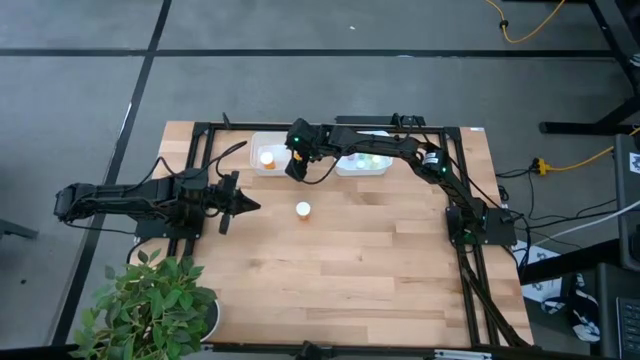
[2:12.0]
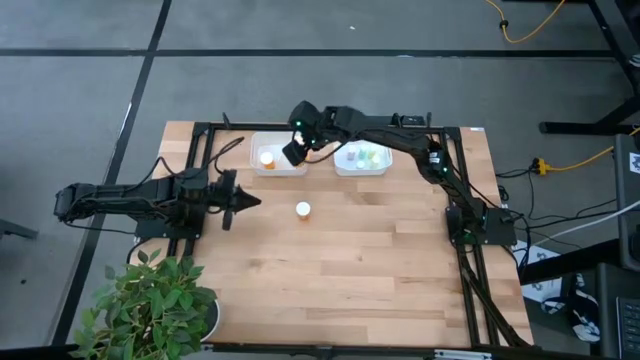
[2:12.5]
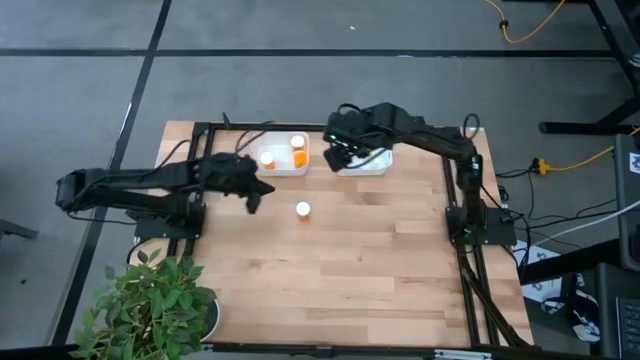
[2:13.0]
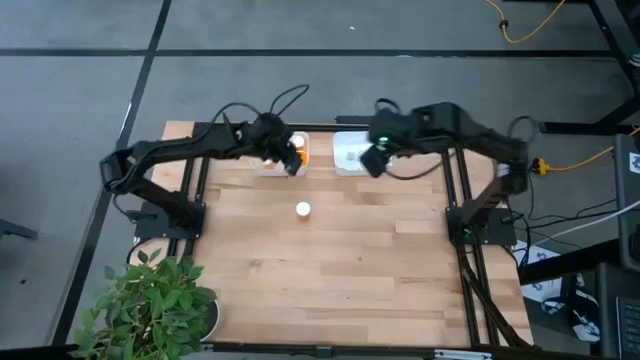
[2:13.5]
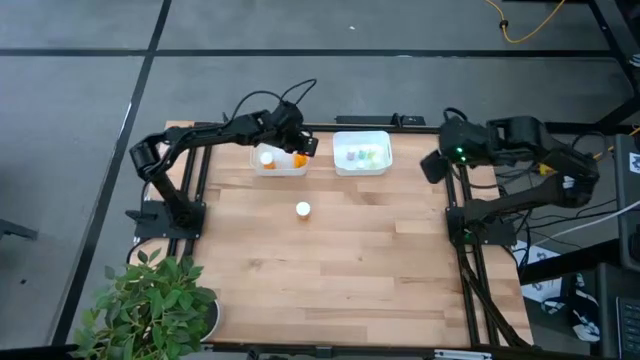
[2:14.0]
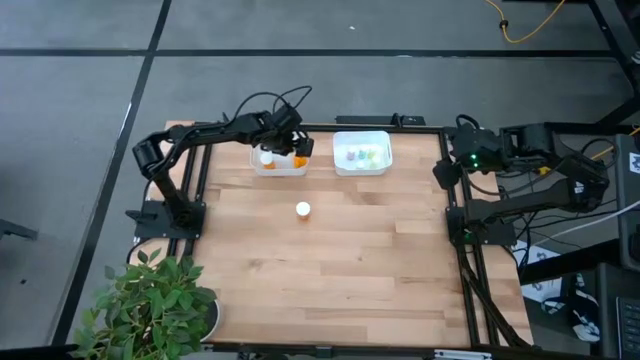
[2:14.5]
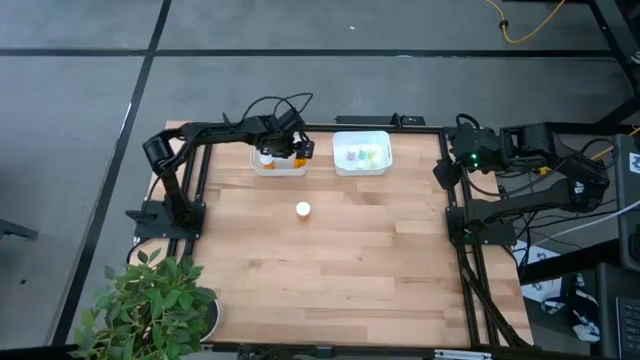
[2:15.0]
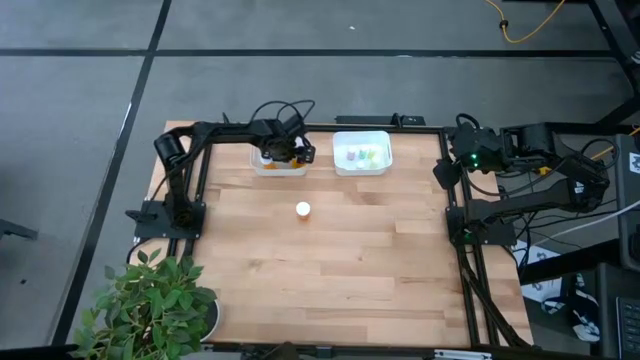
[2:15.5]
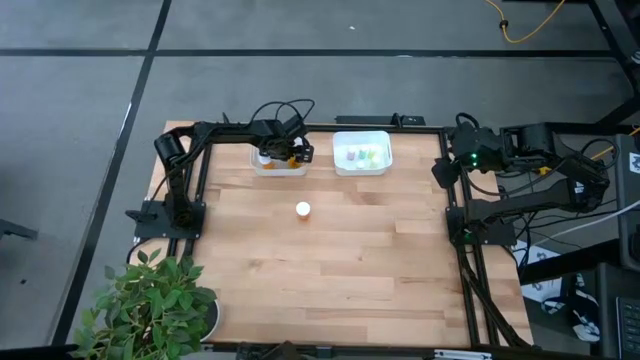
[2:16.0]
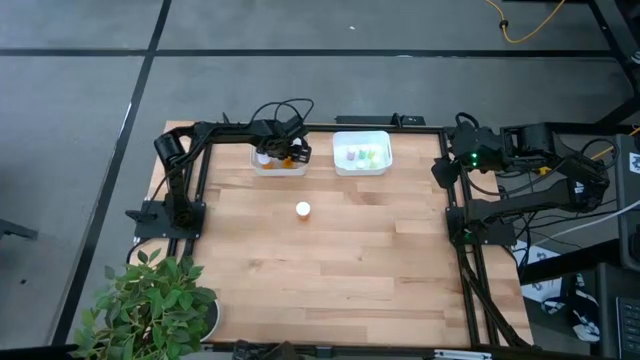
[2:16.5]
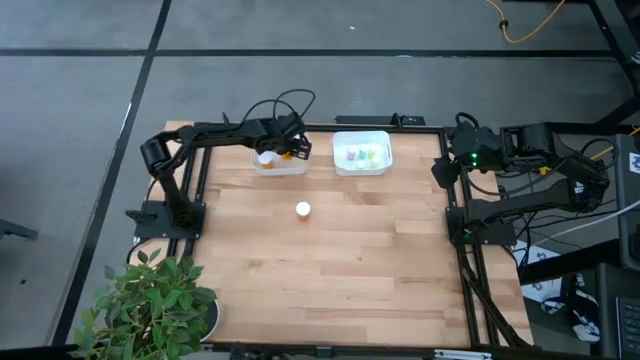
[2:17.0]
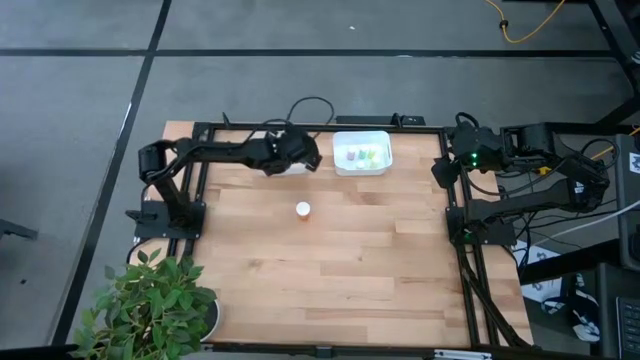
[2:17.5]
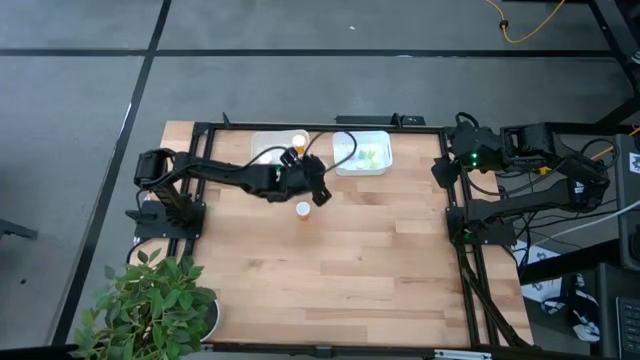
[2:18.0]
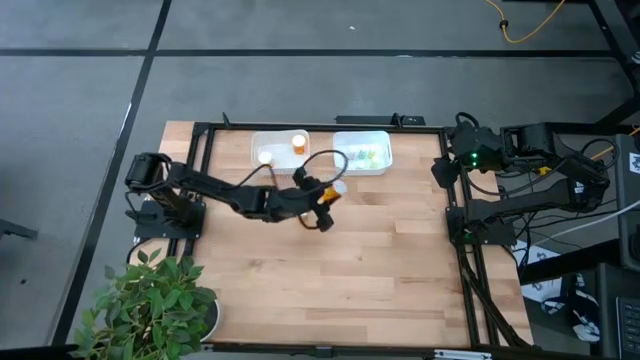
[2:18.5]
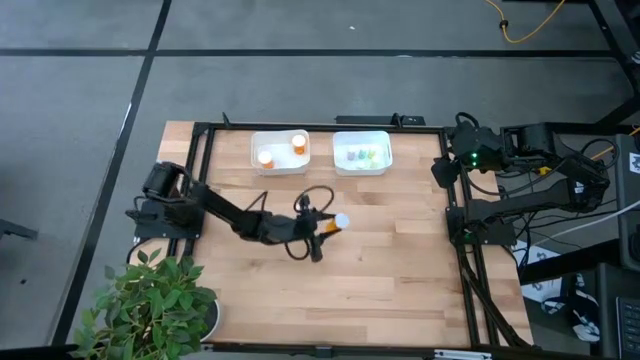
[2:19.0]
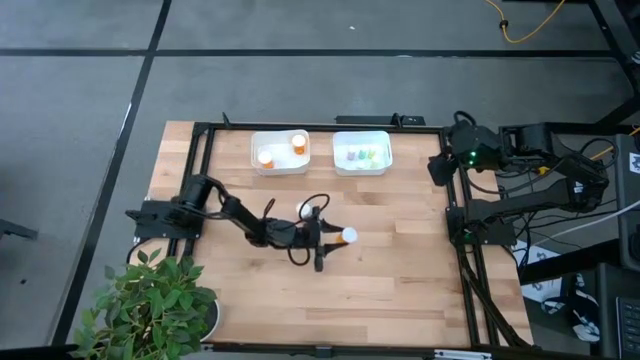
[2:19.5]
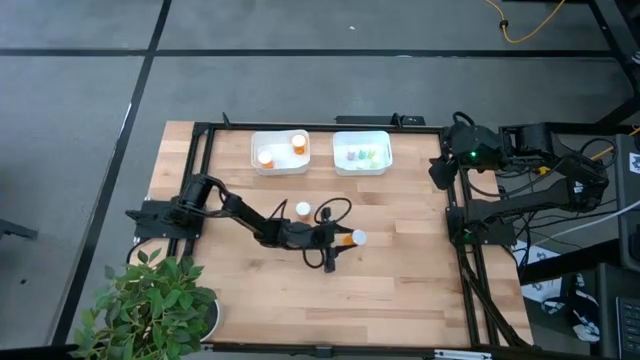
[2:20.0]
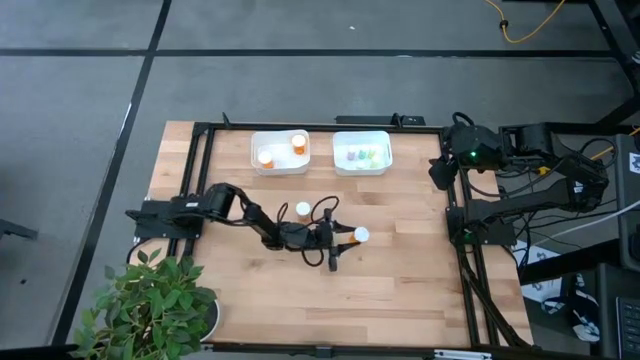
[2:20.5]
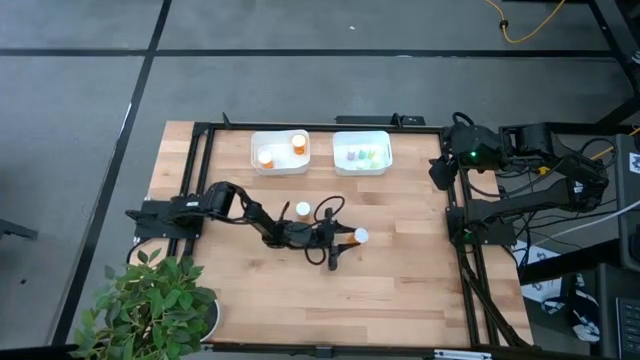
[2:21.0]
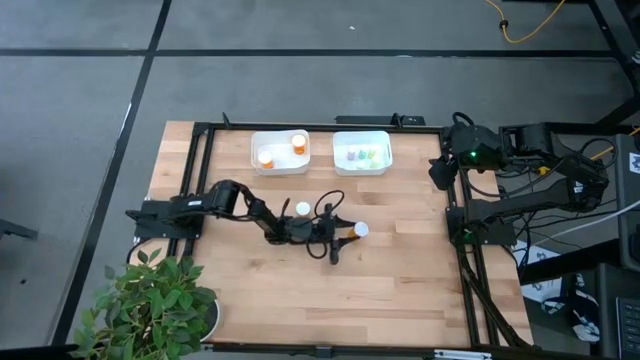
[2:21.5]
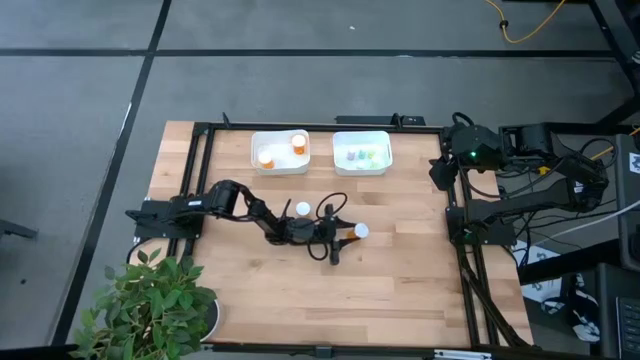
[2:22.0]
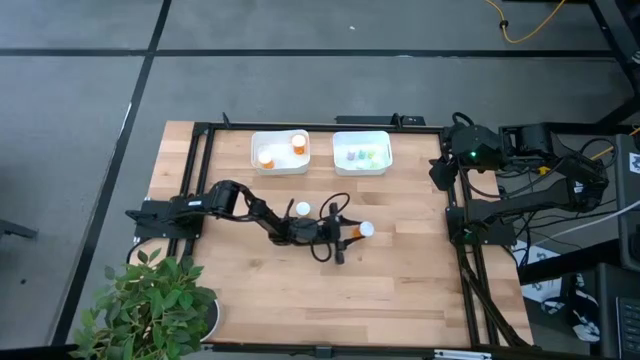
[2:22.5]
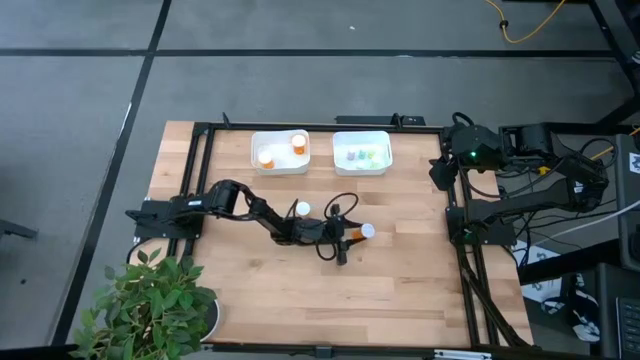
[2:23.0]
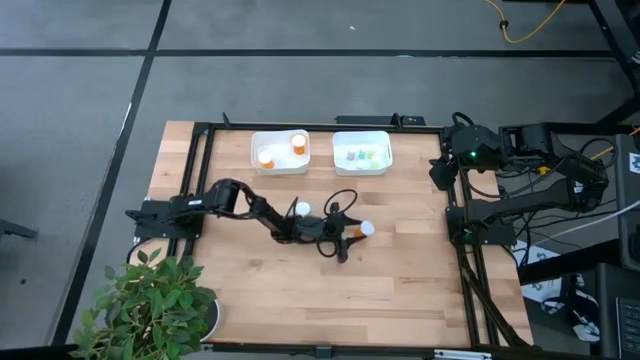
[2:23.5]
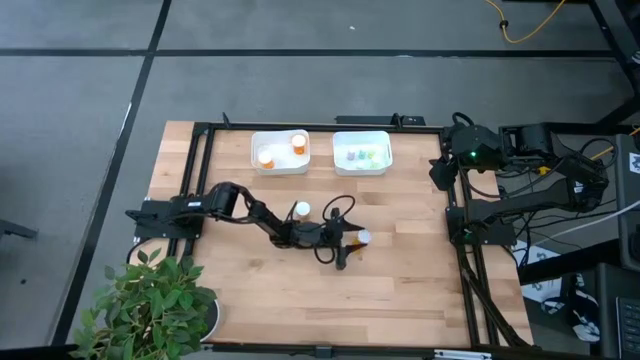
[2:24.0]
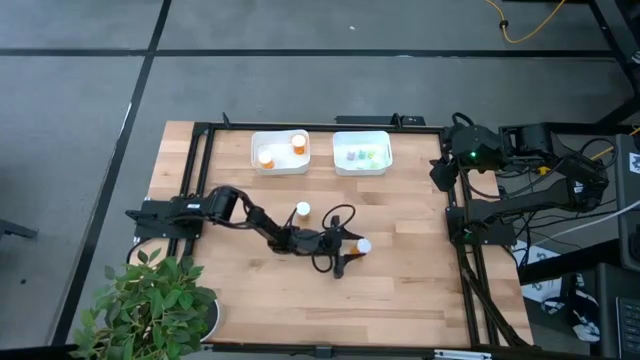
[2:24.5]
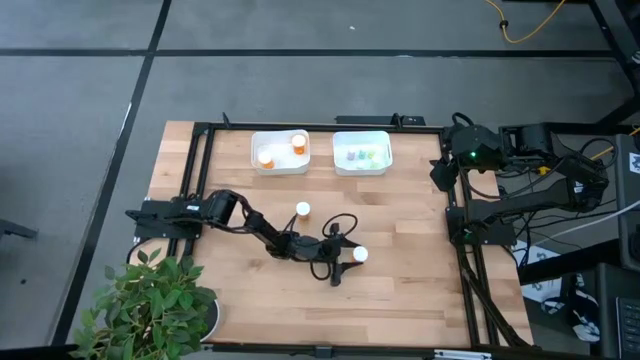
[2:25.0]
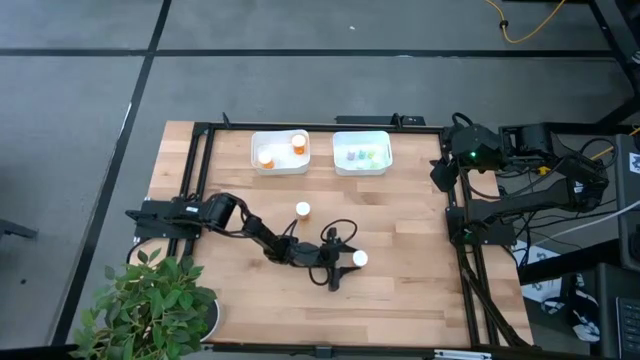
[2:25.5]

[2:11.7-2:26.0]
Task: Pick and place medicine bottles into bin by pill shape (circle, oval)
Put the orange pill bottle into the left white bin

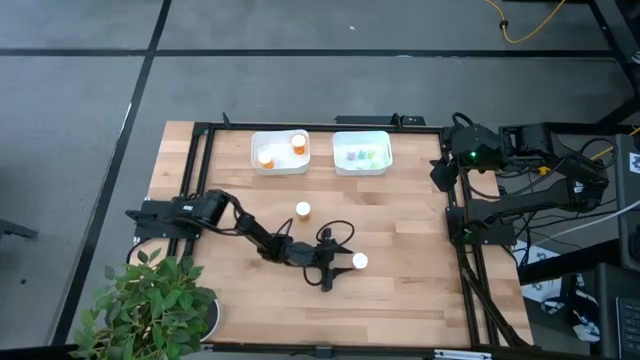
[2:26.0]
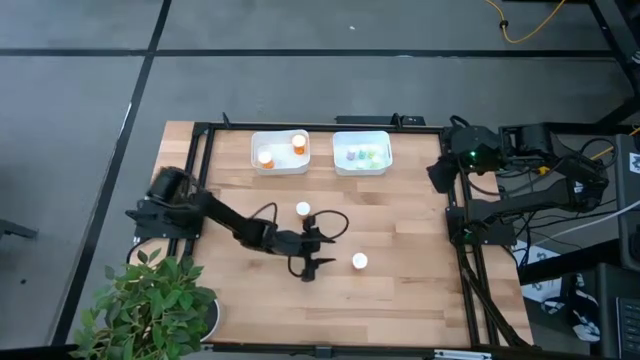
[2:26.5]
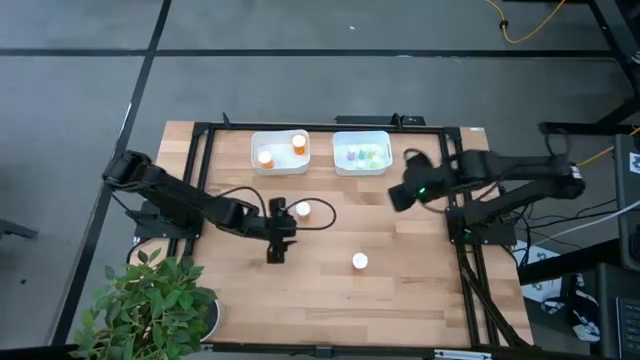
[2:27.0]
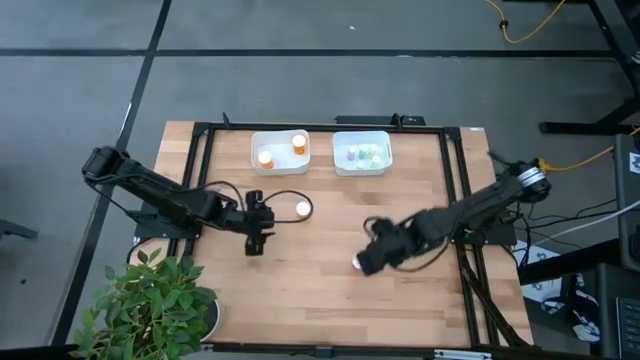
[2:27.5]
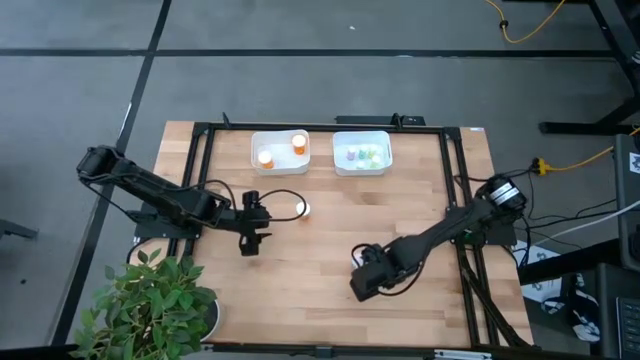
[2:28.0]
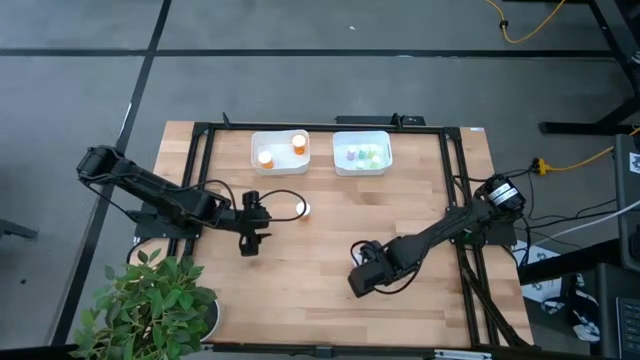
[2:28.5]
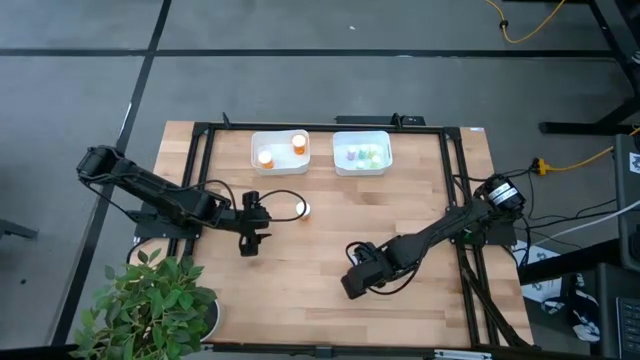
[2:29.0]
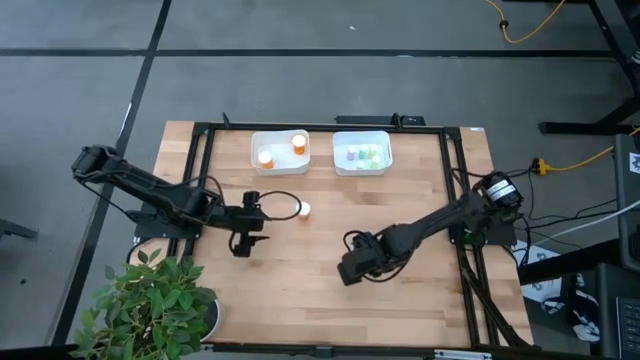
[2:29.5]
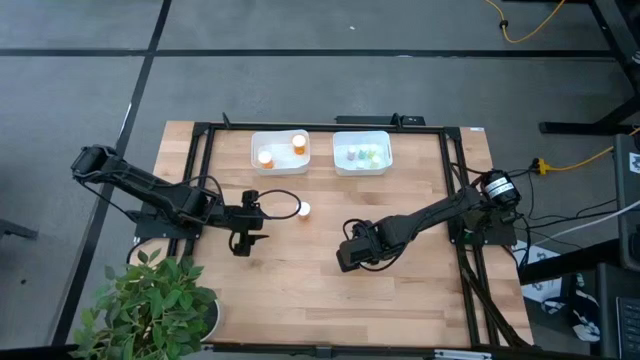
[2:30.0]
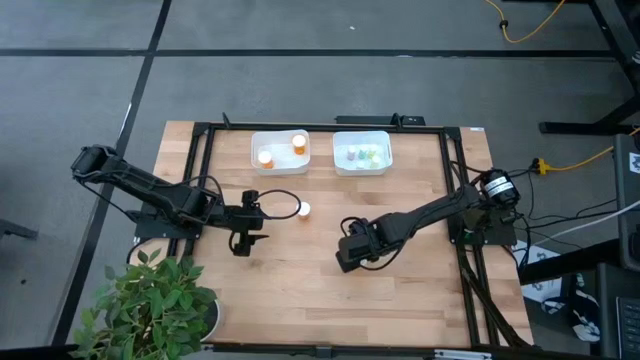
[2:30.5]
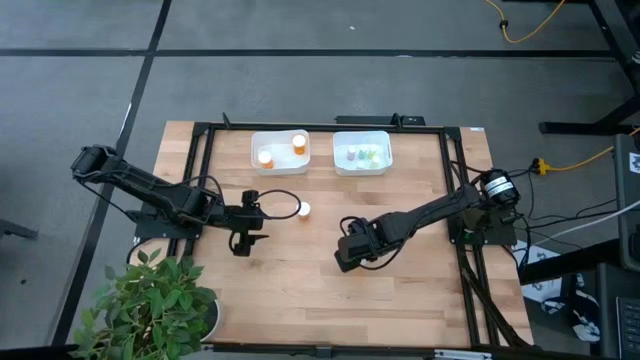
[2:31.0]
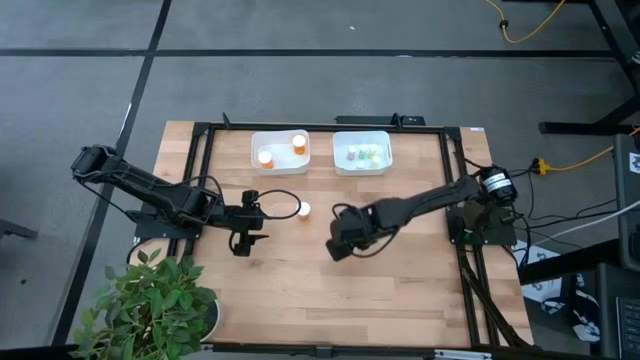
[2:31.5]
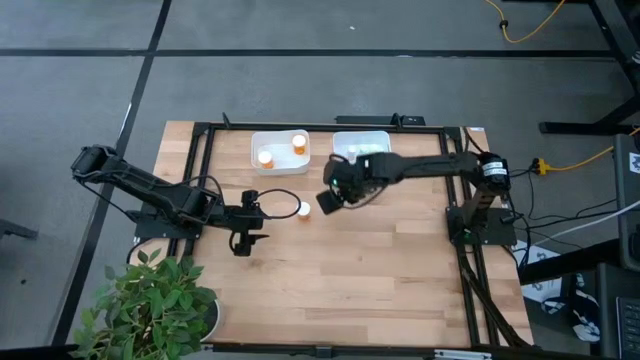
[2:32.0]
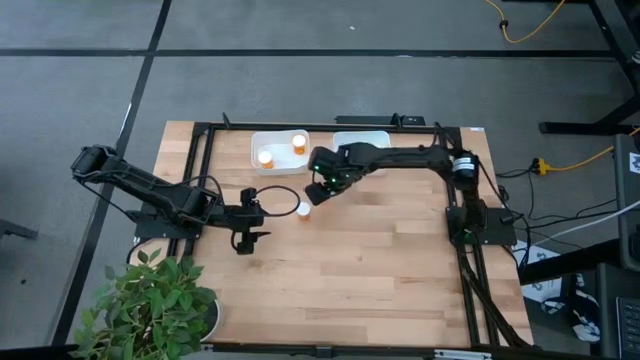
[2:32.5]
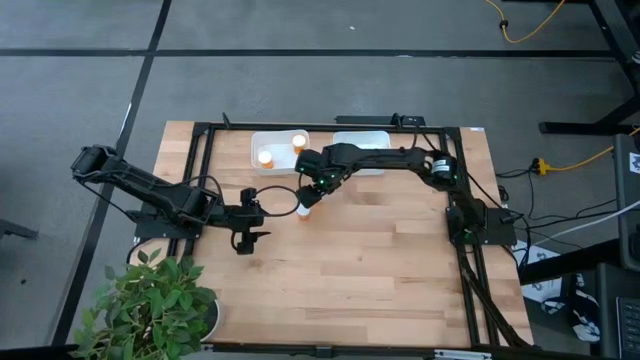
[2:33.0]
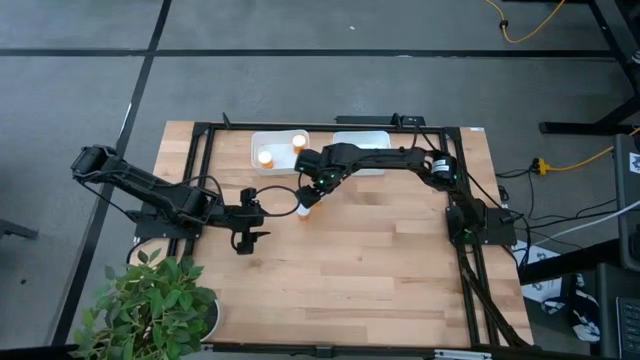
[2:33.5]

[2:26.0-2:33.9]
Prepare the orange pill bottle
